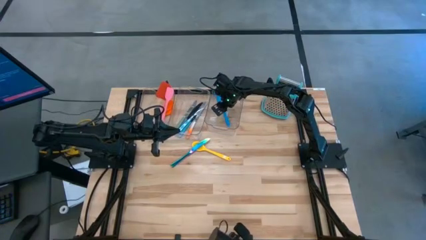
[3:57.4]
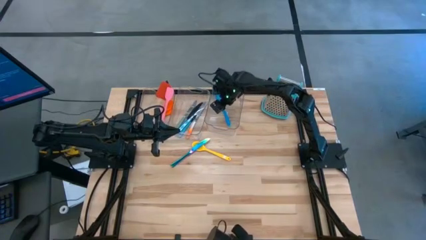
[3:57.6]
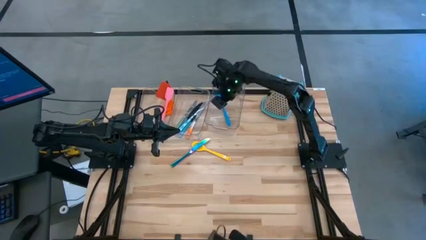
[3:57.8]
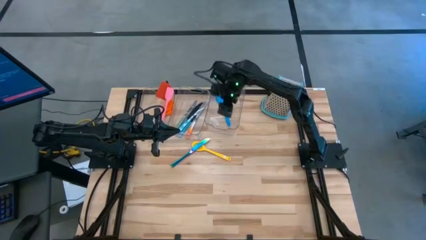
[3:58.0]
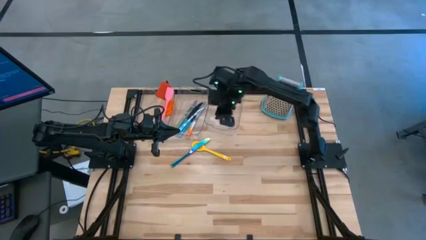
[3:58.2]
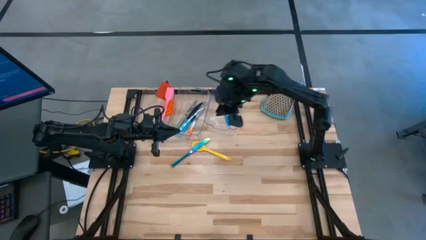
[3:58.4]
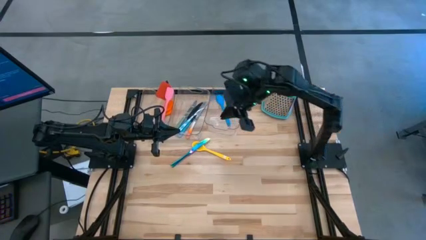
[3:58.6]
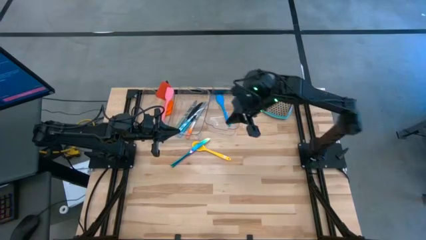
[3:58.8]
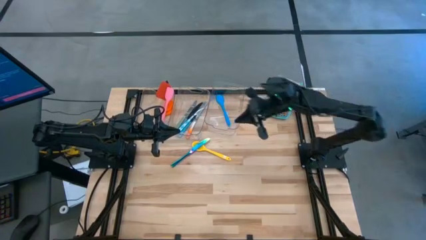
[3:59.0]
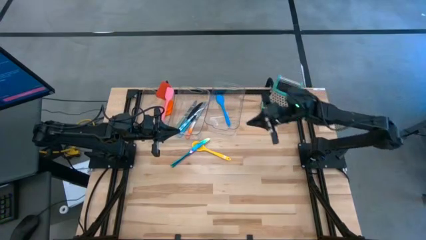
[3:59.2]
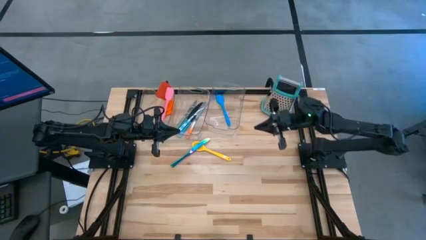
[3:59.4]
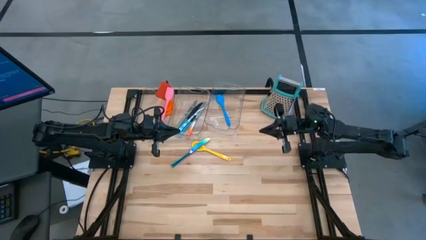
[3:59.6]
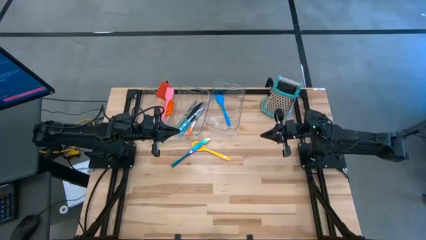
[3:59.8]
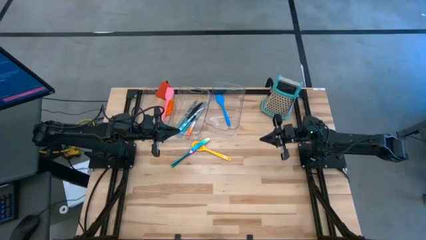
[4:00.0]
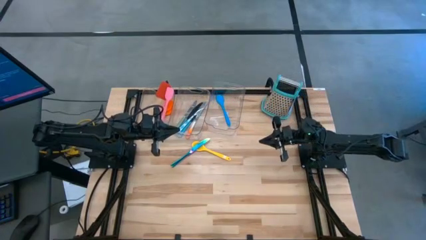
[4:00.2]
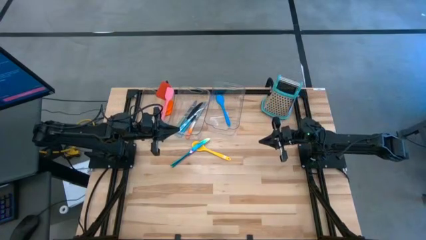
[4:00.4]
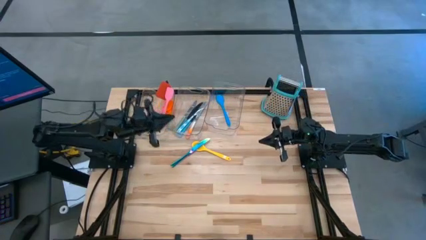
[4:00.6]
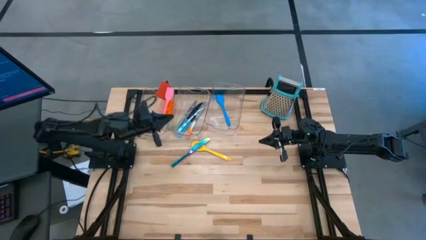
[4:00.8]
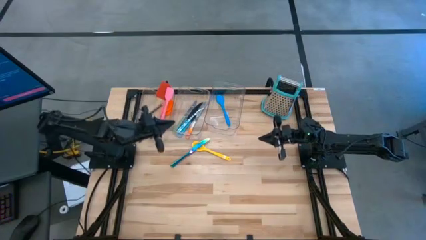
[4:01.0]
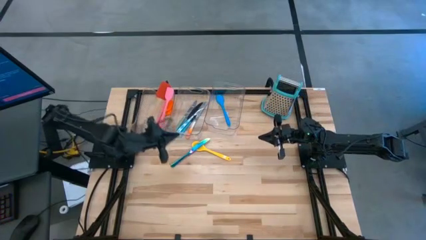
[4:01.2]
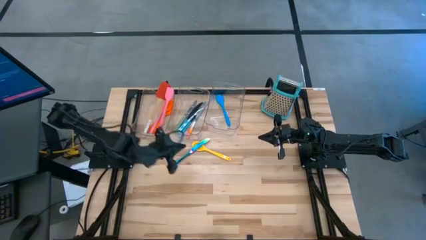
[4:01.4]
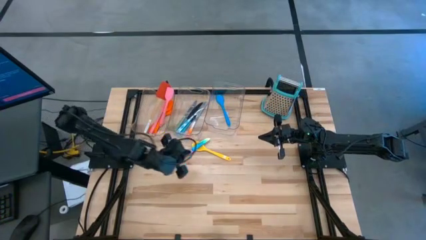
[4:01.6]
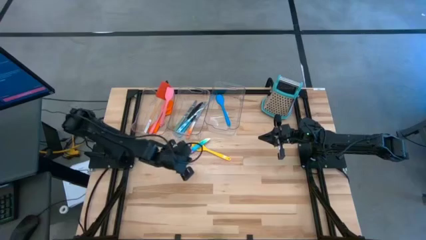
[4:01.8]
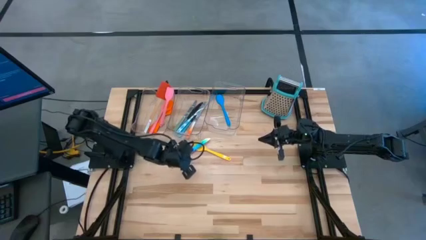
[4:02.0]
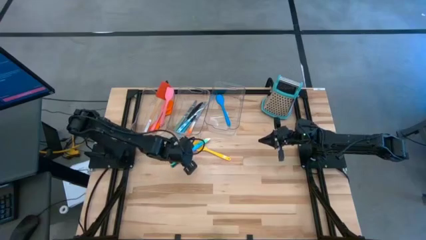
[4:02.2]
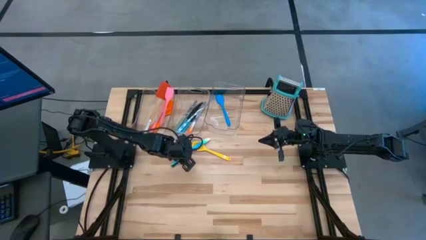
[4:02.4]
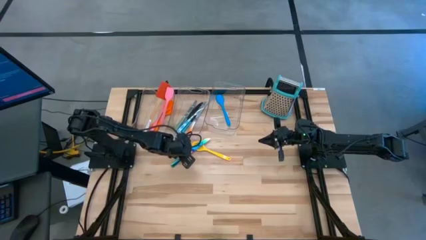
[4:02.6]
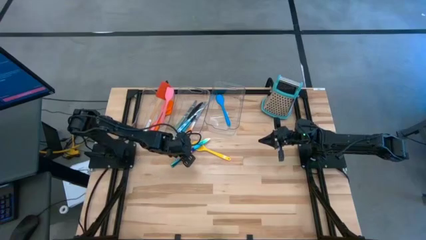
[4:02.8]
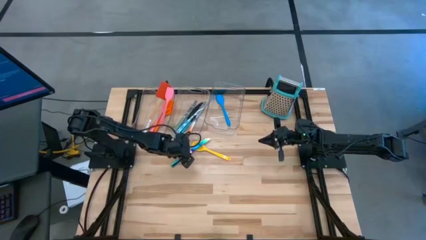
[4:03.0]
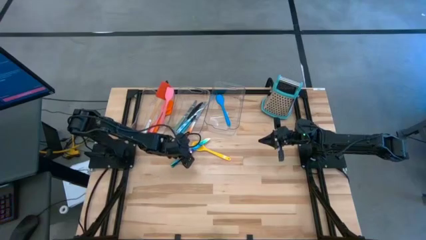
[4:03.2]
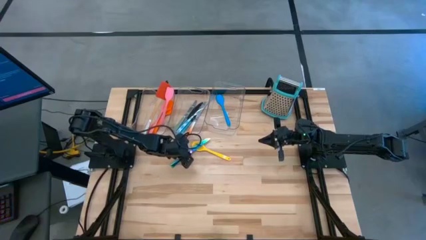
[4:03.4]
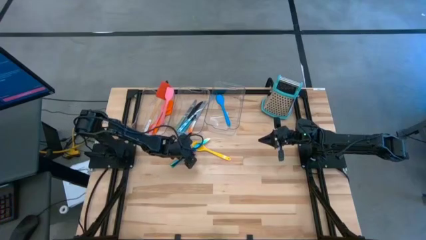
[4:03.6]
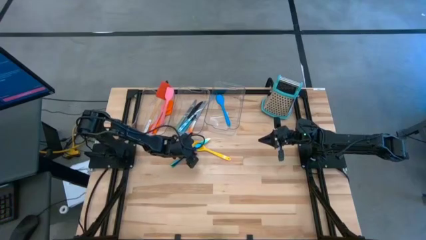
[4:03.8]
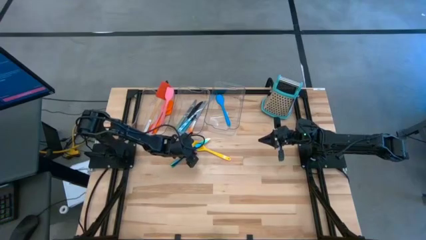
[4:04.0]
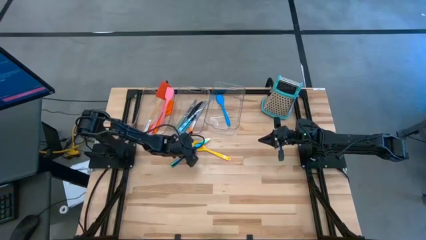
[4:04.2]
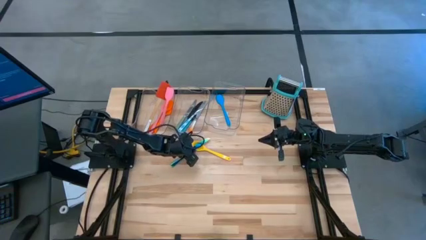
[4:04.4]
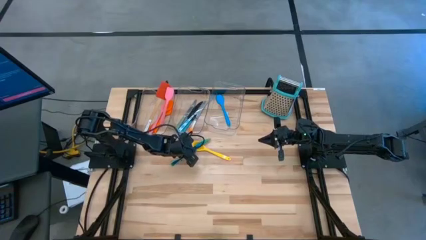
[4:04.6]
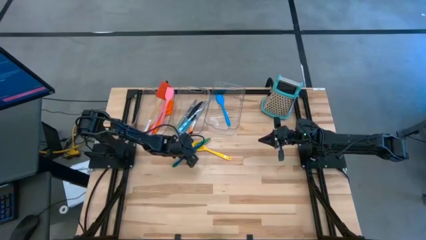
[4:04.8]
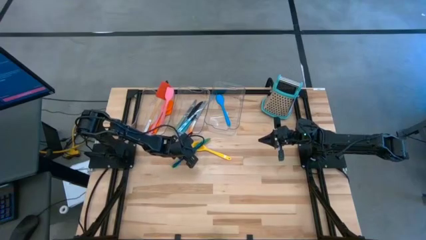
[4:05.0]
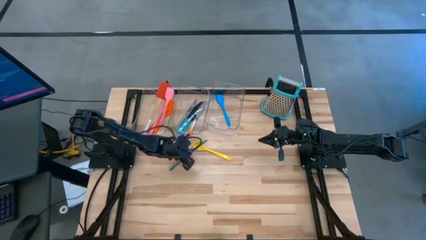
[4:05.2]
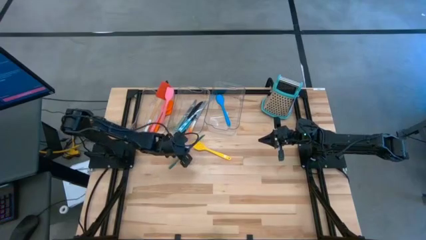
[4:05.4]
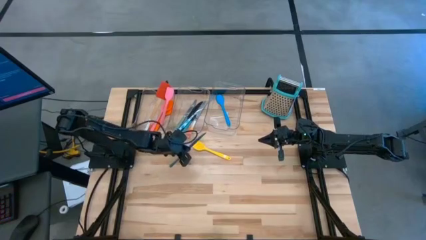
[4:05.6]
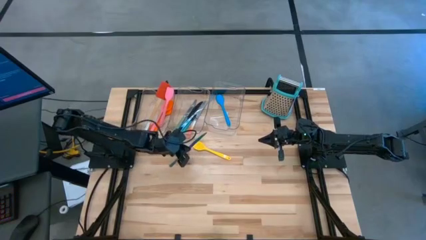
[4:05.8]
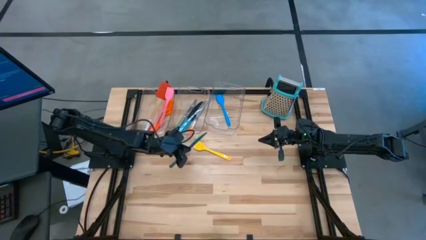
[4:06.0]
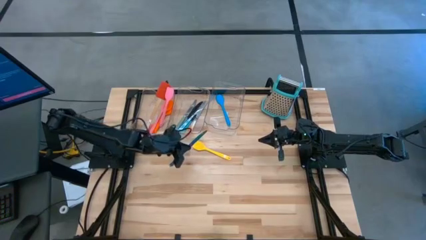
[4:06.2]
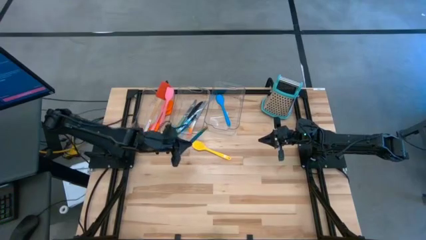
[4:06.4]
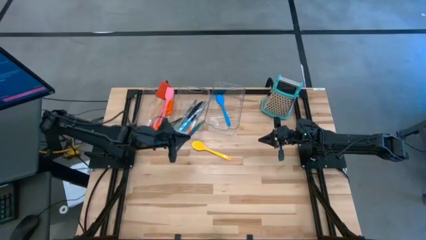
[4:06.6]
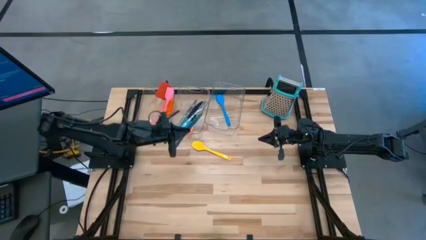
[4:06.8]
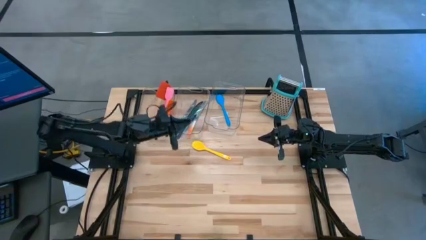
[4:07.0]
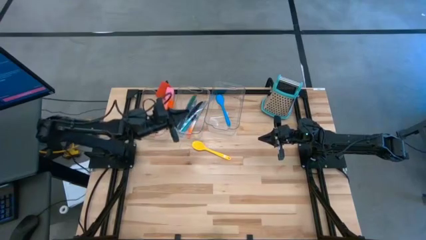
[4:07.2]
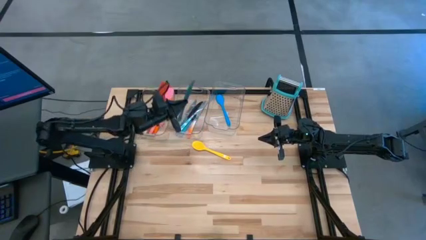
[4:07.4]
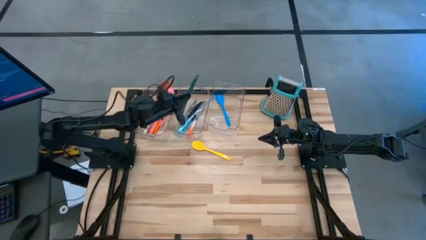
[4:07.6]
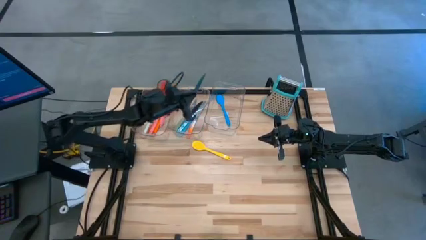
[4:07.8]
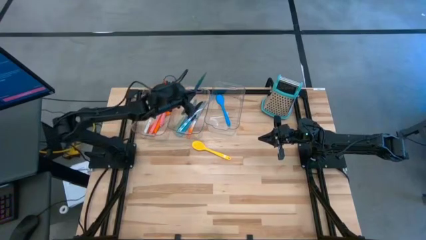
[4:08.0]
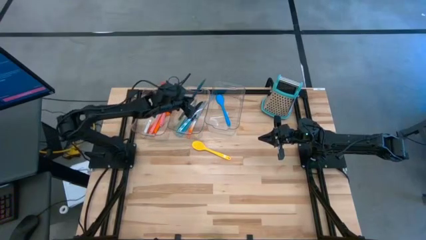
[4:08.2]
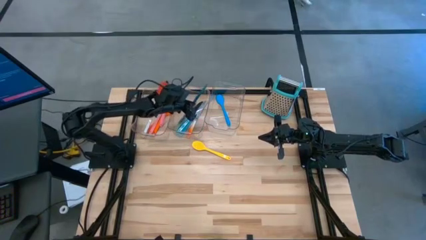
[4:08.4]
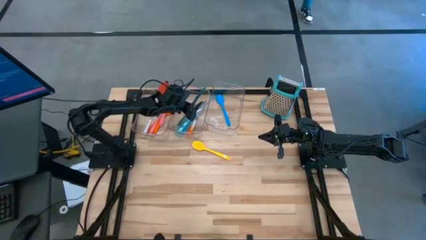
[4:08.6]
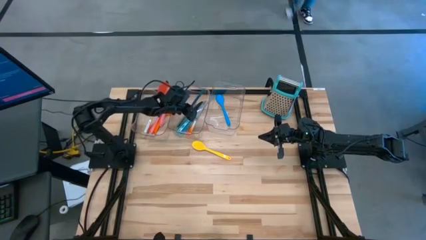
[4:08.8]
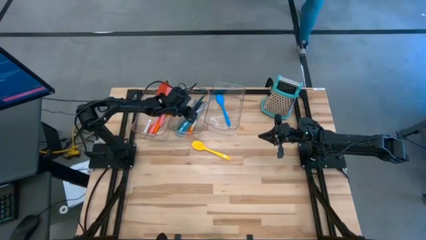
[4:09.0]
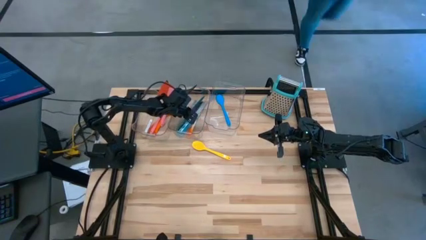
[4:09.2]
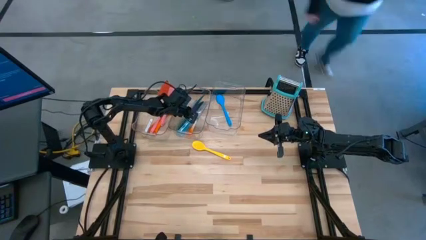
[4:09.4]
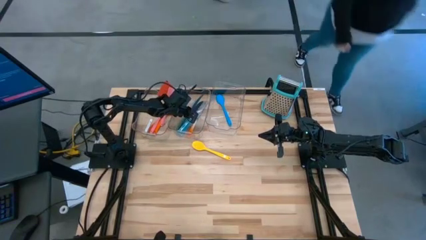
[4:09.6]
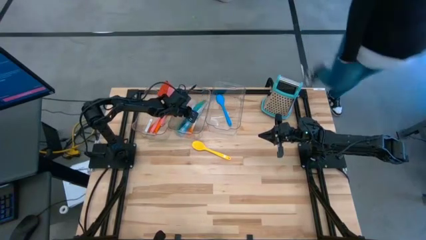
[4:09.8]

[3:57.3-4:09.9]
Task: Pick & Place Kitchen Items
Put the dark blue knife into the middle transparent bin

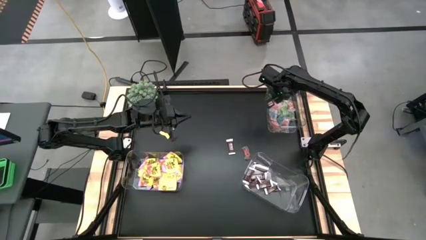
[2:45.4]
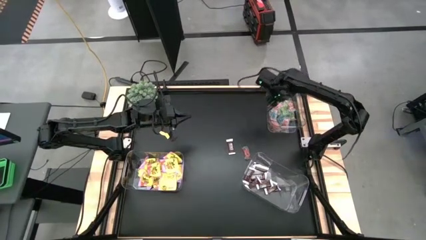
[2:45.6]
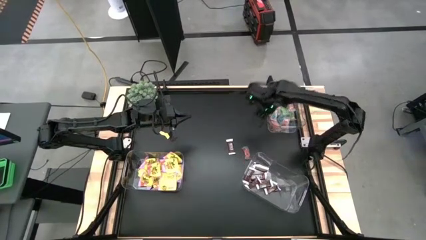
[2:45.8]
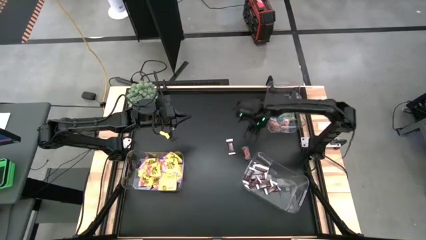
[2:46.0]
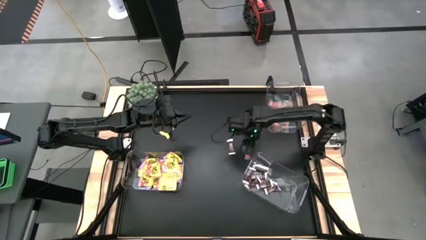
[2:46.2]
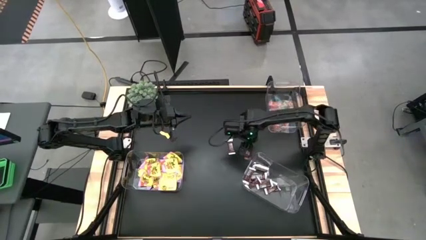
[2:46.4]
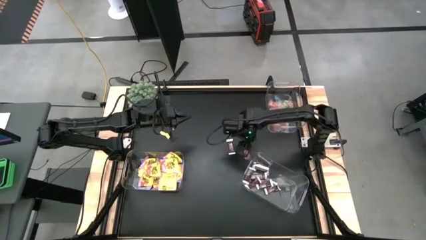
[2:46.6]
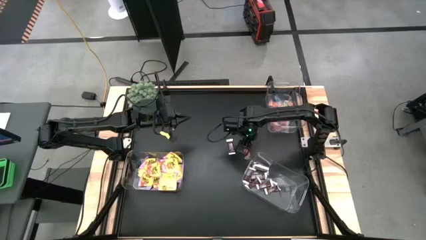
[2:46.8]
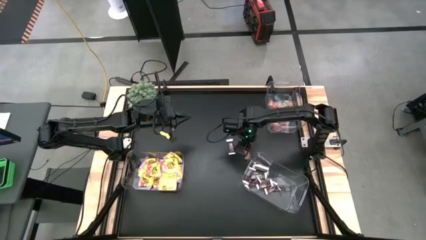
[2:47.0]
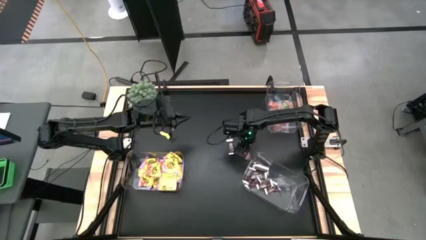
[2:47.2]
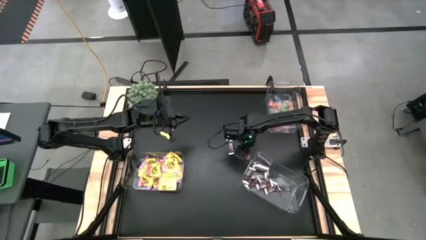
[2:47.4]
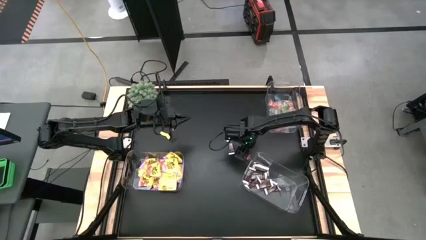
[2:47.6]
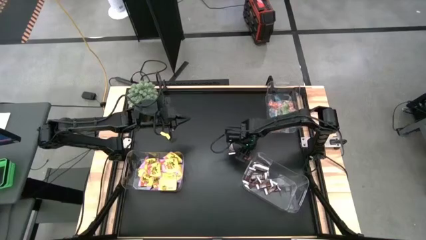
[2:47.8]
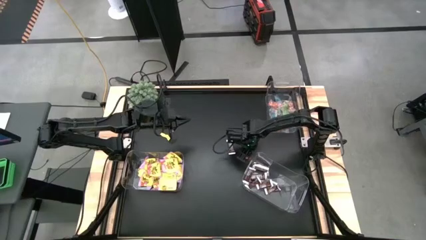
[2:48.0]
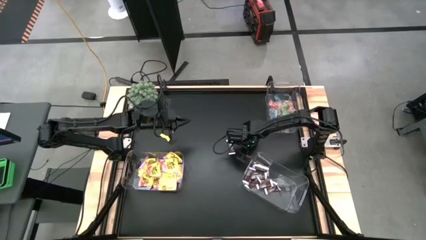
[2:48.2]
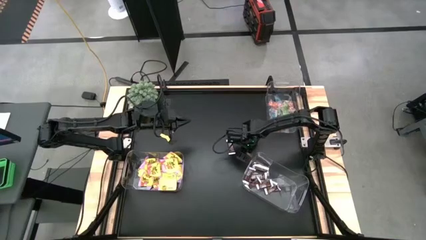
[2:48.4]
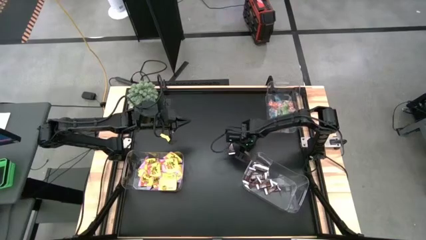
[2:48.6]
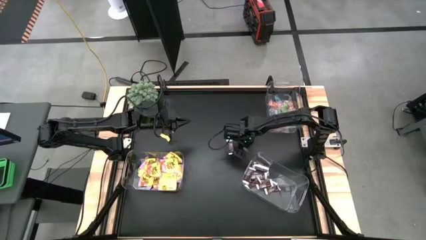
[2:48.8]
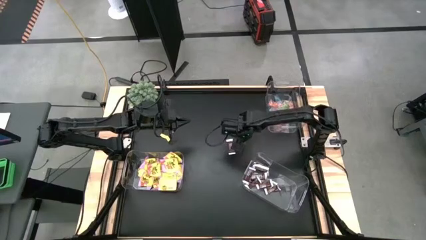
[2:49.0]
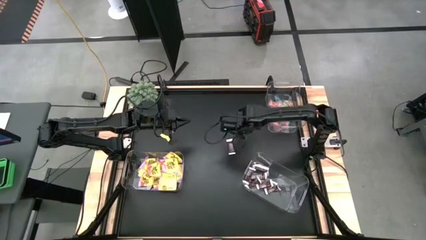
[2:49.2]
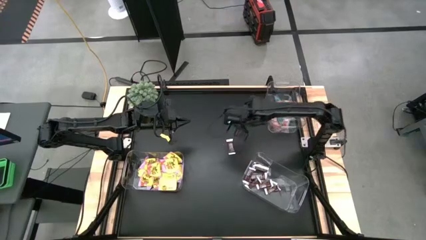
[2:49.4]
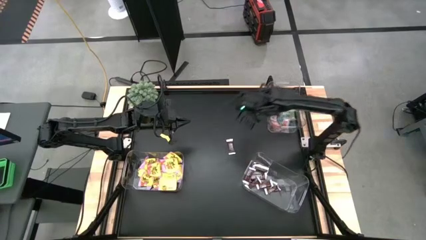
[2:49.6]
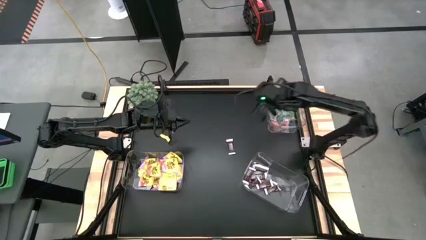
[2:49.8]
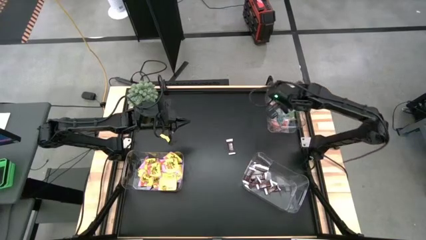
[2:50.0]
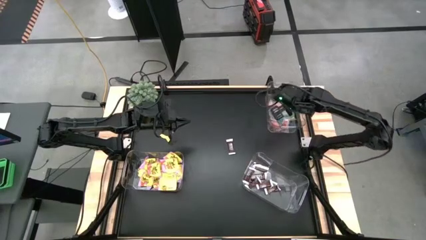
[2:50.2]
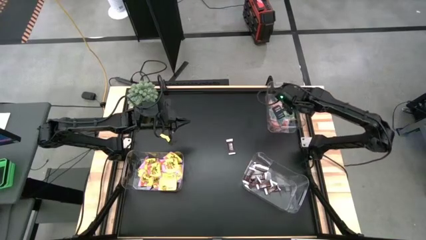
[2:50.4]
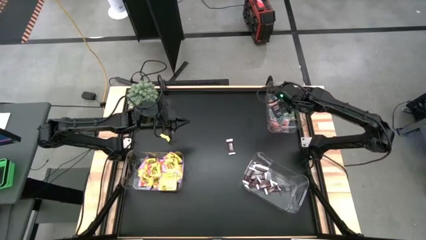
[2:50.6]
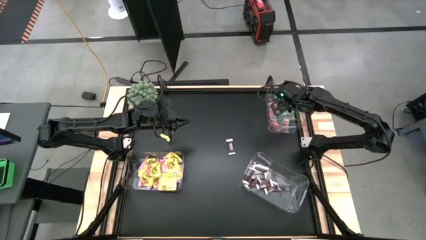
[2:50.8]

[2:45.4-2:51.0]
Task: Sort candy
Put the orange candy in the top right transparent container
